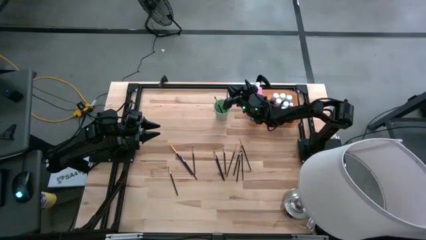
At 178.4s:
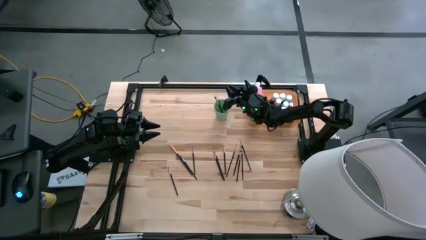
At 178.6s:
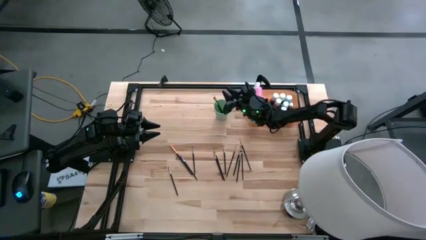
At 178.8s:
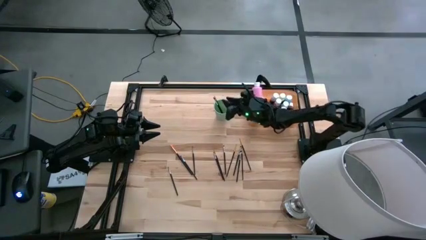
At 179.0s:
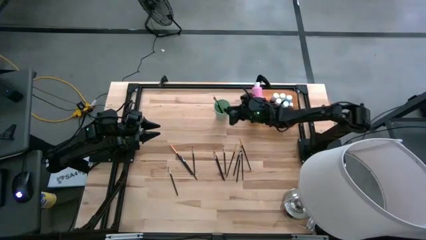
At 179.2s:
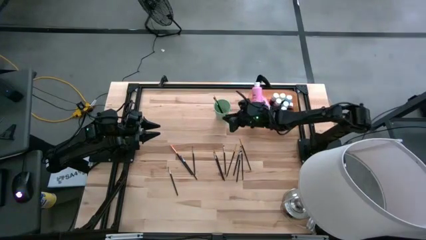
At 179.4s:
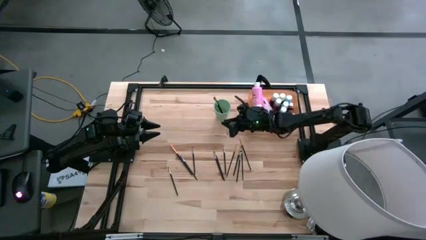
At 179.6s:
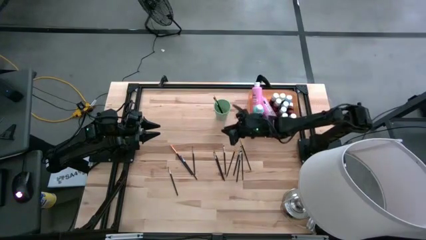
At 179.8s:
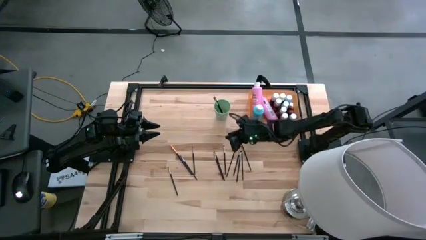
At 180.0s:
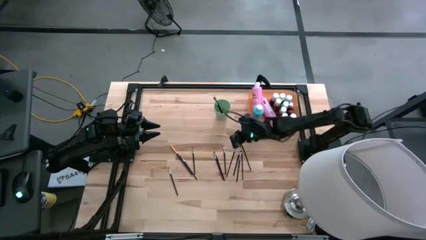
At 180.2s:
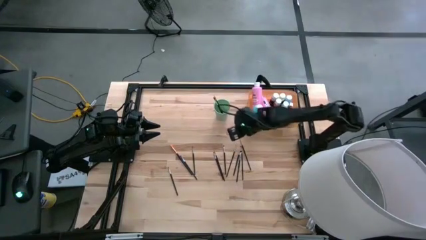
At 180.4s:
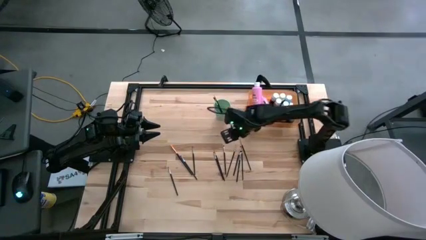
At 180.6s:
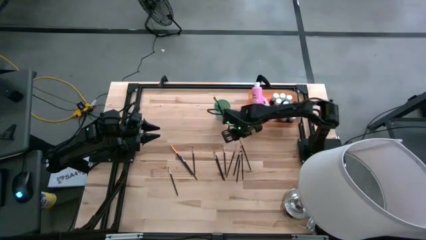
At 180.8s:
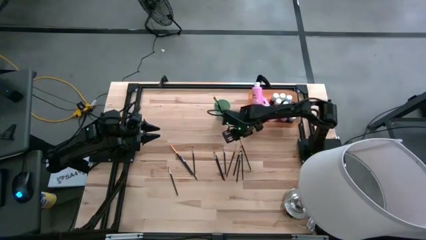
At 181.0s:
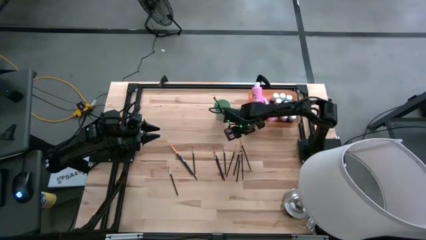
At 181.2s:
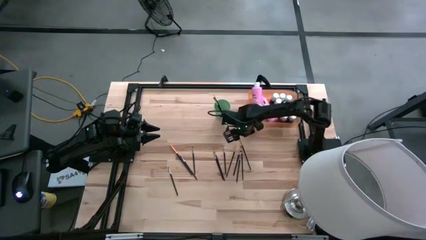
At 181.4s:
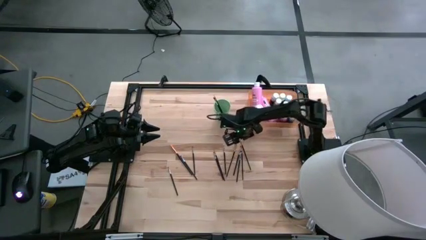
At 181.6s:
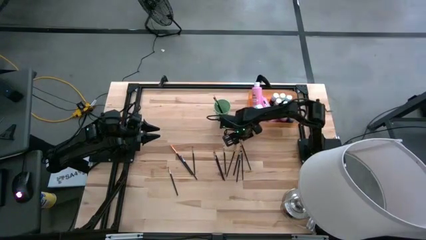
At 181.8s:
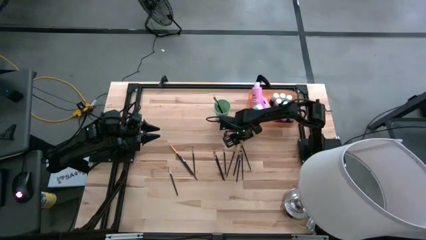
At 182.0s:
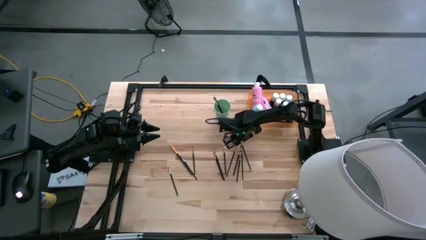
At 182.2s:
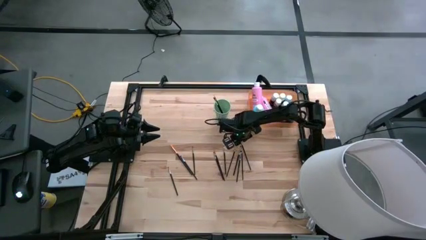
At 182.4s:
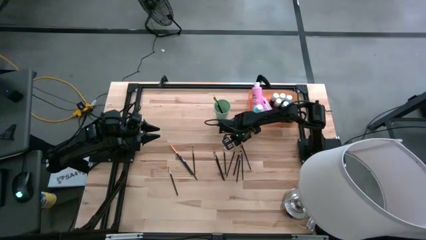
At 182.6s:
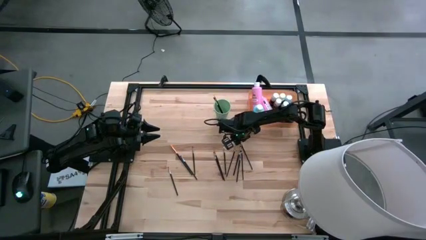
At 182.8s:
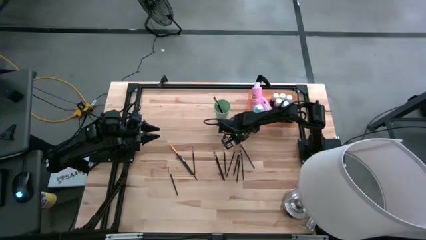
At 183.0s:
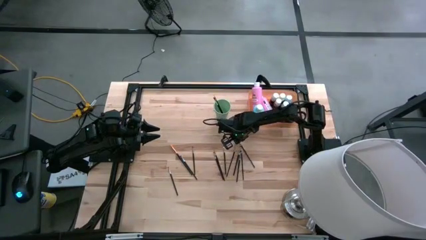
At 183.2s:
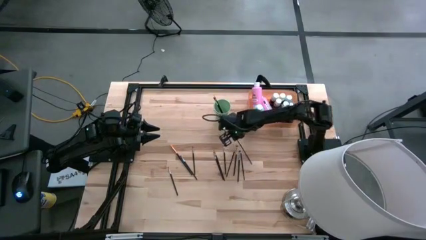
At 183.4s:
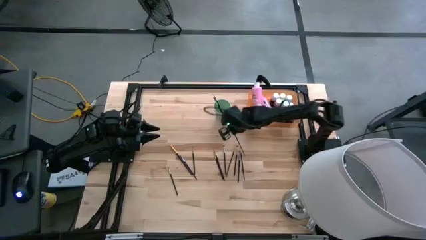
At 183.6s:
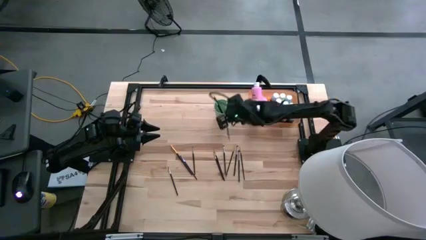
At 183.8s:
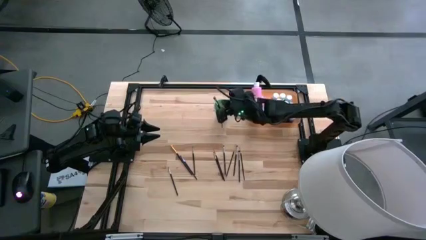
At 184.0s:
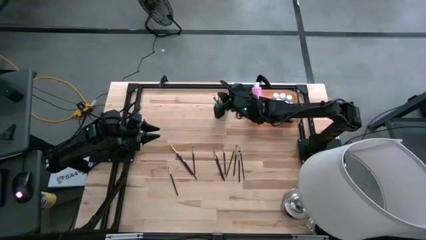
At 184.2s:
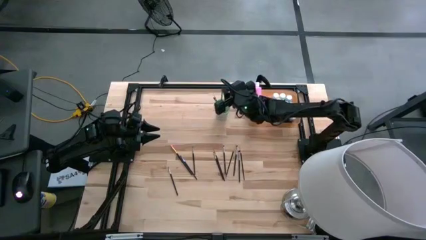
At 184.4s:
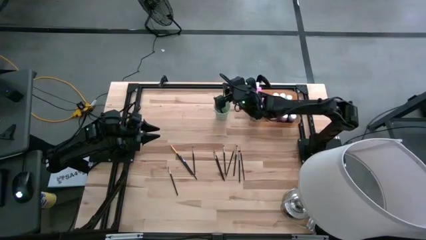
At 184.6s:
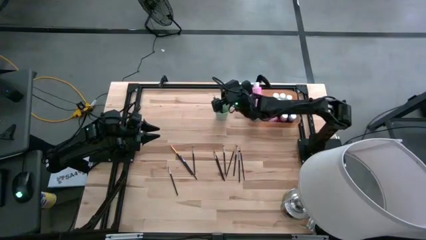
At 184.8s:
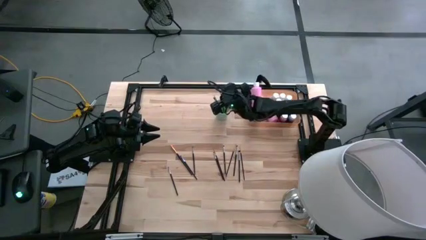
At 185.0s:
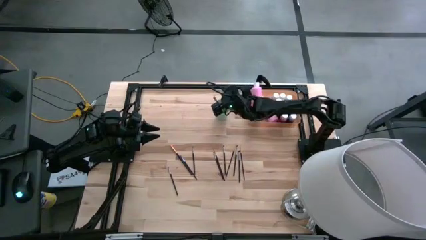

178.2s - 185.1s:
Task: Pick & Place Paint Supplies
Put the gold paintbrush into the green cup

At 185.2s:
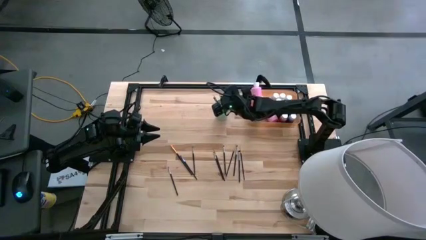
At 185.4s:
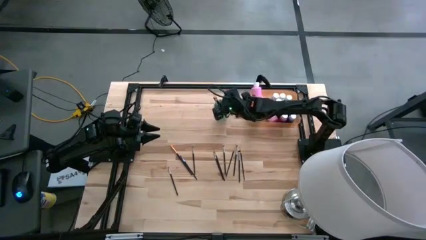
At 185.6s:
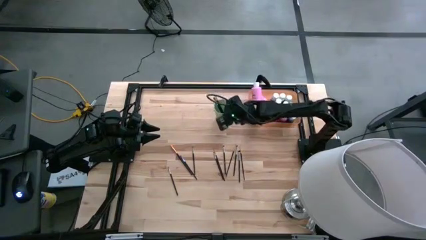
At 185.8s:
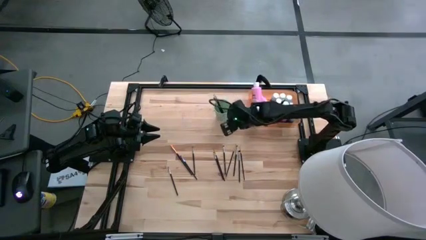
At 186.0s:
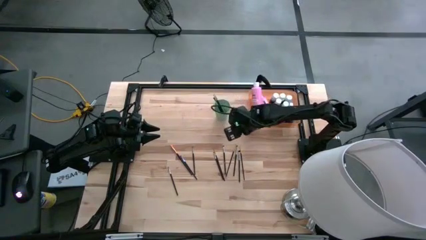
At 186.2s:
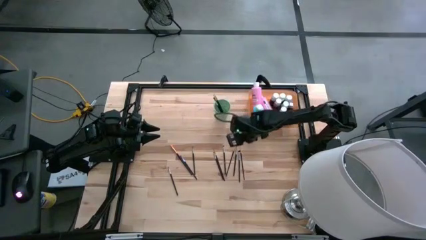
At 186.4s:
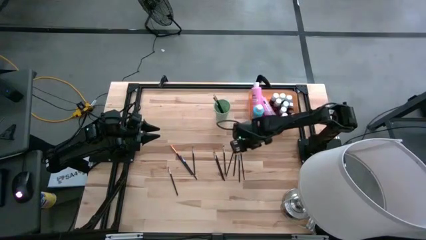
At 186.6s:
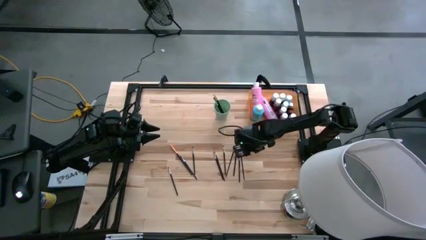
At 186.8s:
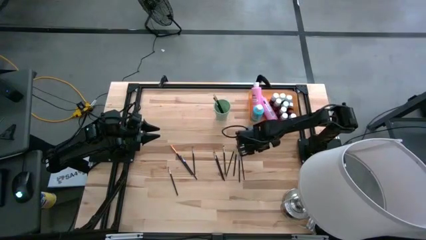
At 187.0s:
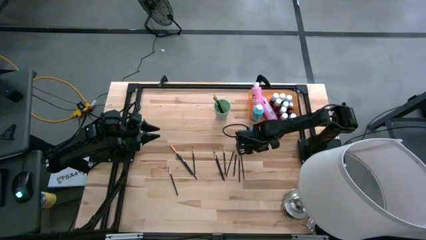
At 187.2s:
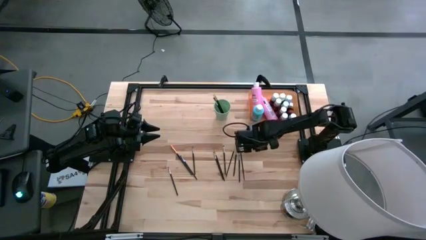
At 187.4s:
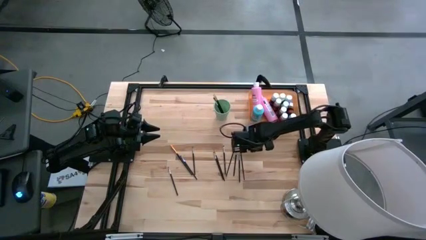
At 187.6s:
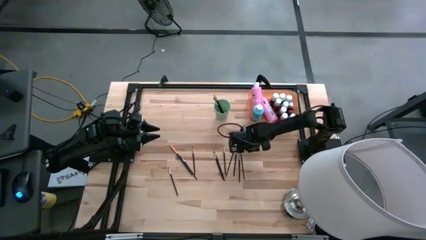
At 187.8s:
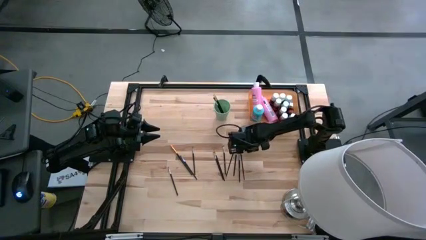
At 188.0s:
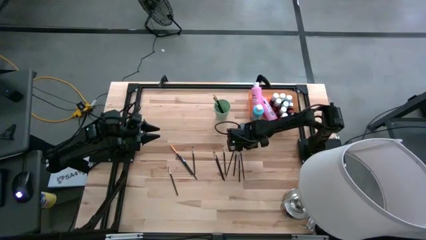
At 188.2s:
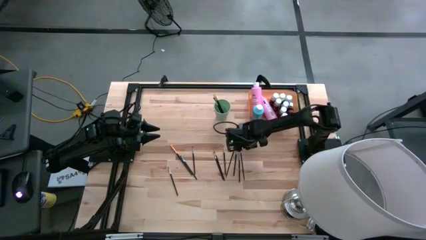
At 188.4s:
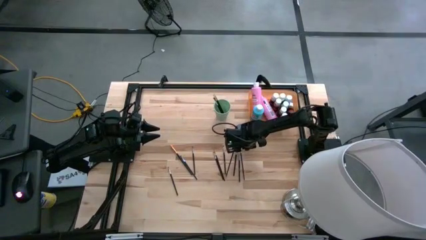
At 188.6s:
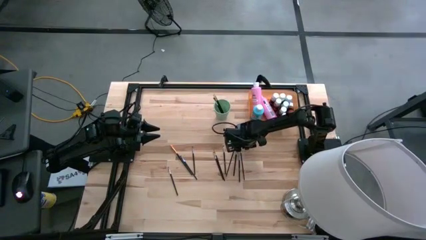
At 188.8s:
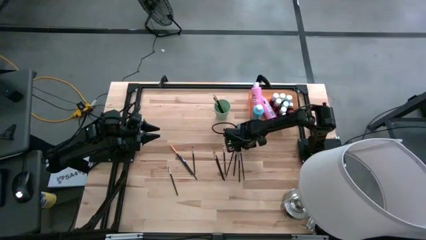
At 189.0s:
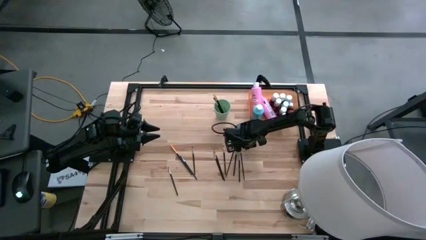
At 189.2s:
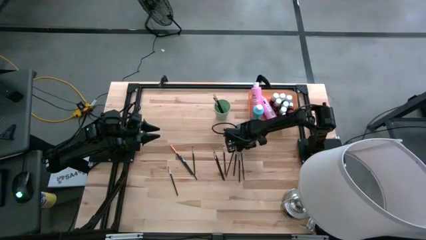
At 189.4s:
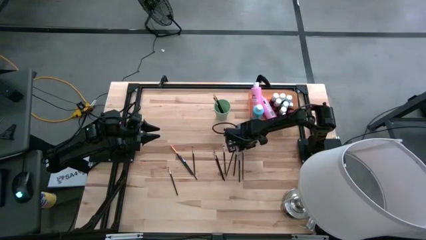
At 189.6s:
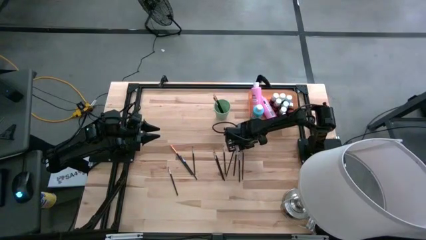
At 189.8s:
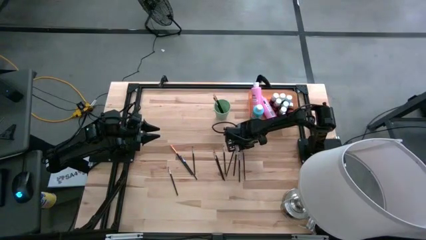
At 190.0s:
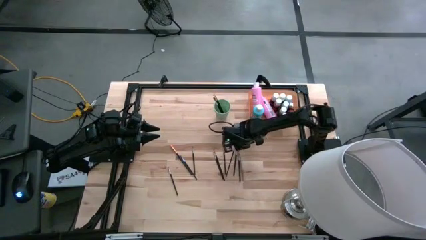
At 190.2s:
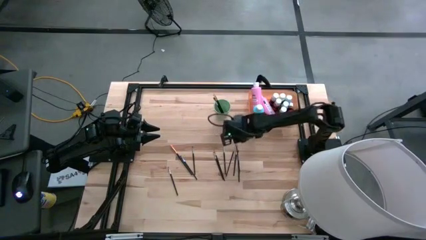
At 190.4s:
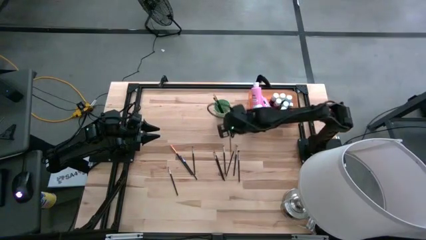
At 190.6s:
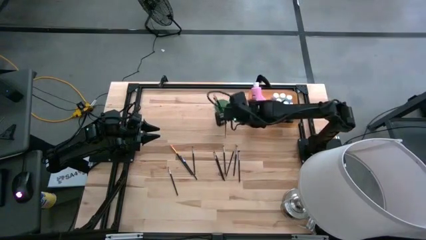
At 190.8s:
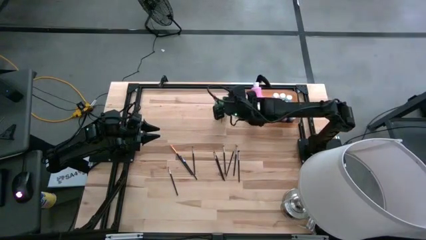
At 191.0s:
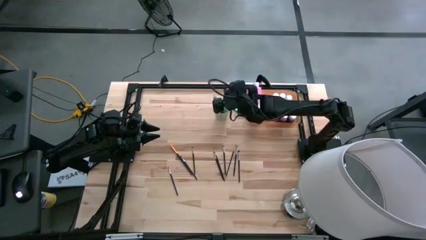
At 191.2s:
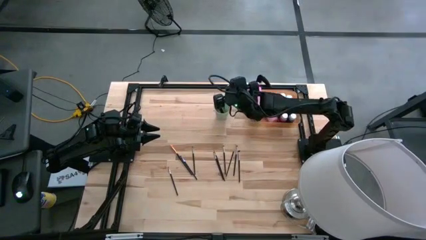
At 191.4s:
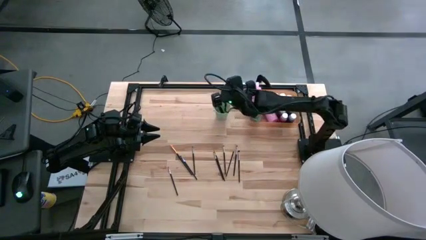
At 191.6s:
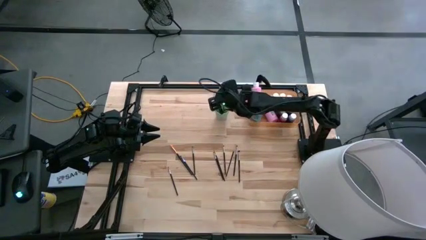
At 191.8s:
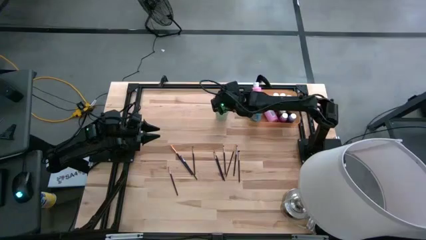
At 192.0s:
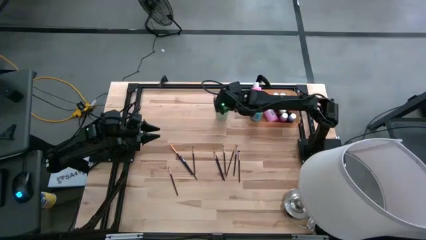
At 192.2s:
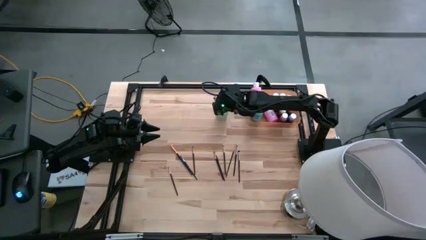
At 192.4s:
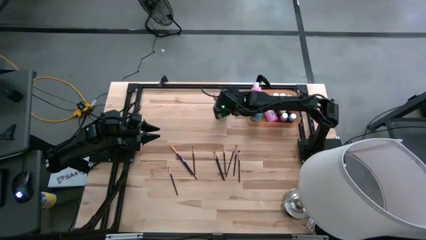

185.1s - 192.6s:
Put the gold paintbrush into the green cup
